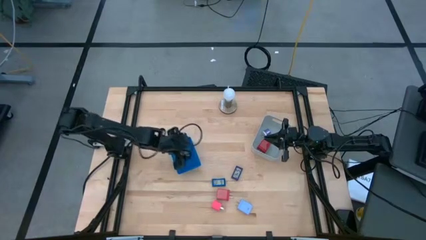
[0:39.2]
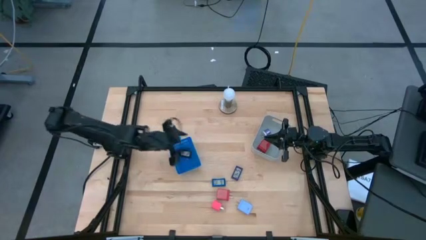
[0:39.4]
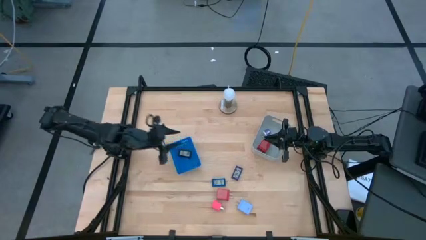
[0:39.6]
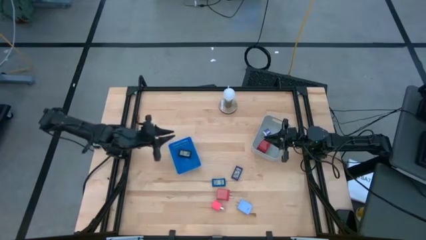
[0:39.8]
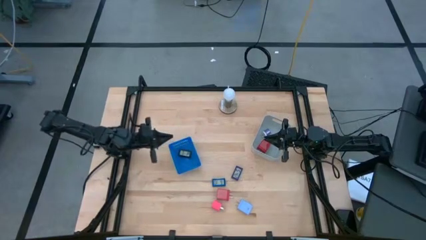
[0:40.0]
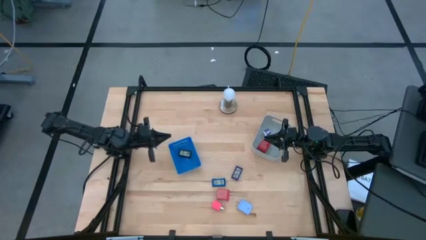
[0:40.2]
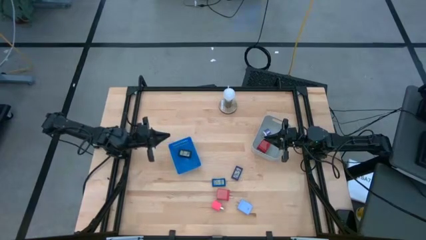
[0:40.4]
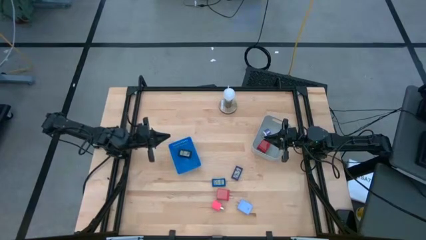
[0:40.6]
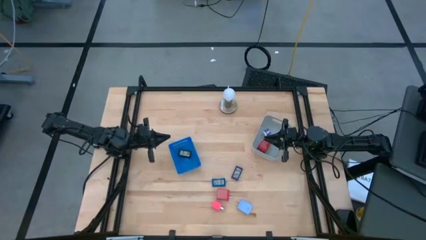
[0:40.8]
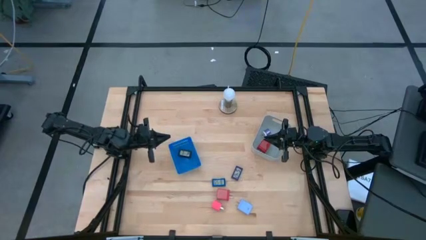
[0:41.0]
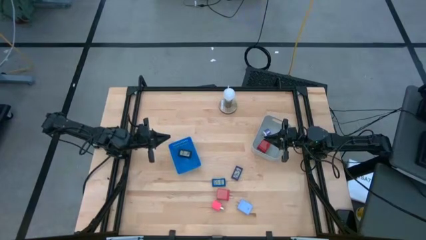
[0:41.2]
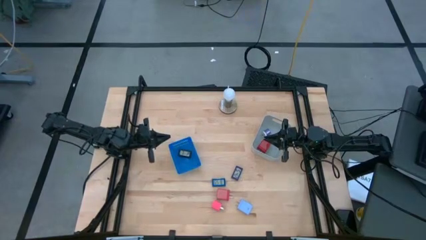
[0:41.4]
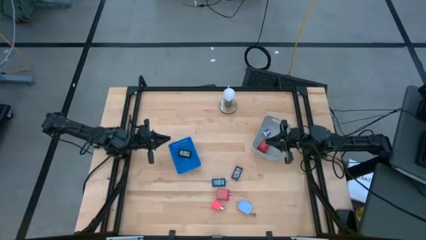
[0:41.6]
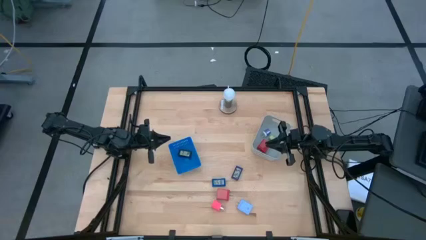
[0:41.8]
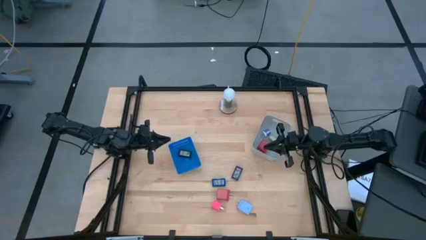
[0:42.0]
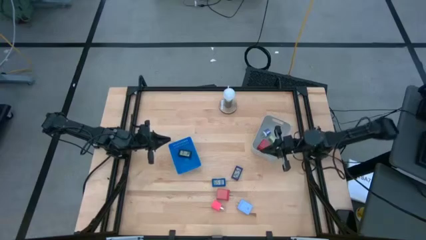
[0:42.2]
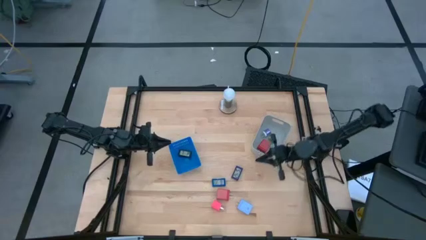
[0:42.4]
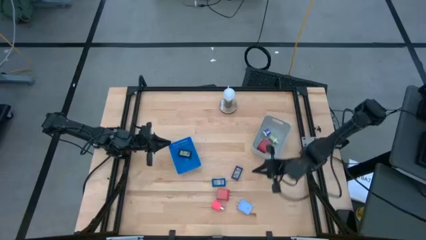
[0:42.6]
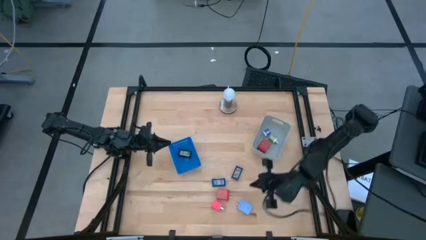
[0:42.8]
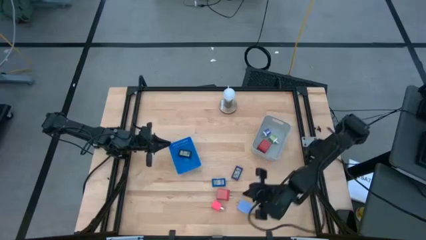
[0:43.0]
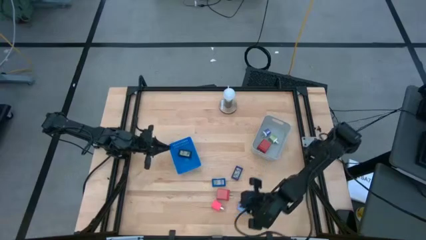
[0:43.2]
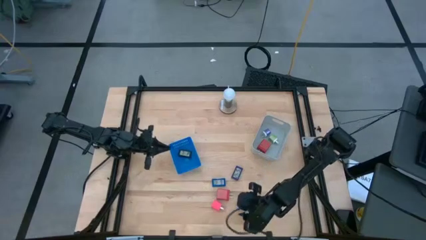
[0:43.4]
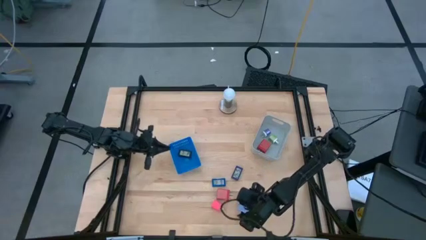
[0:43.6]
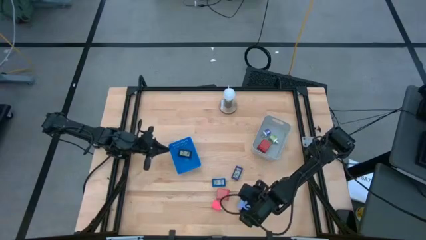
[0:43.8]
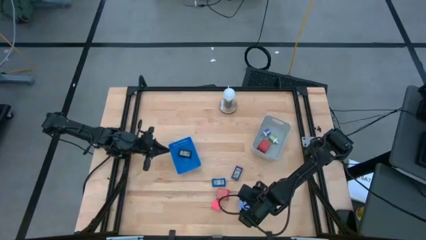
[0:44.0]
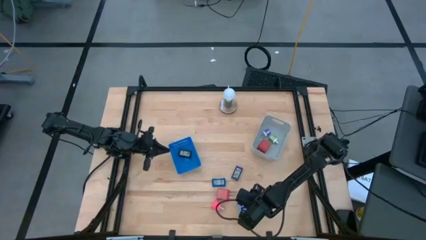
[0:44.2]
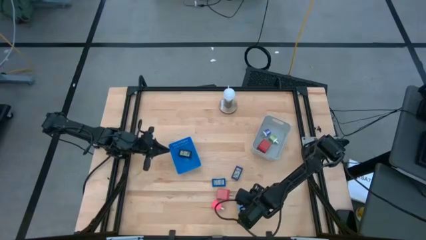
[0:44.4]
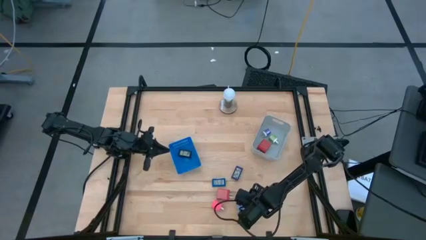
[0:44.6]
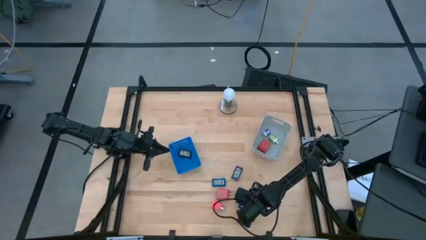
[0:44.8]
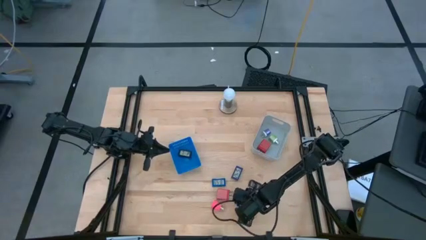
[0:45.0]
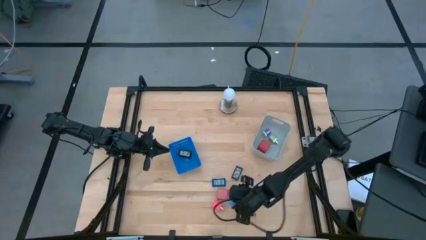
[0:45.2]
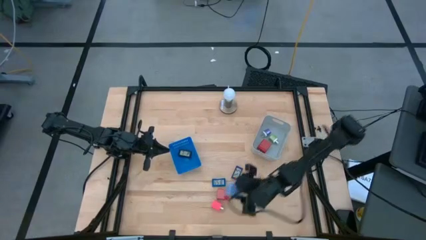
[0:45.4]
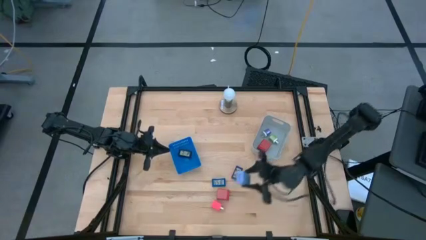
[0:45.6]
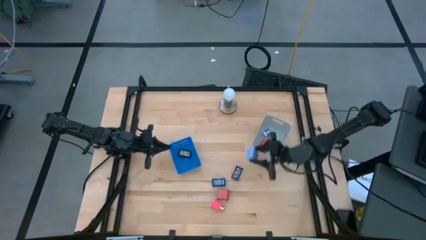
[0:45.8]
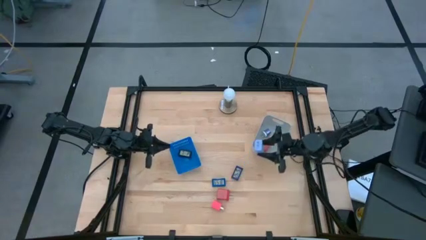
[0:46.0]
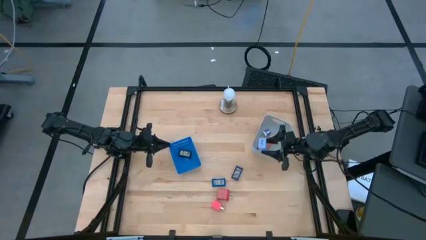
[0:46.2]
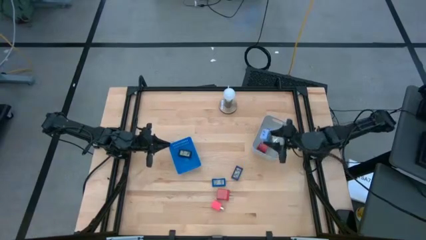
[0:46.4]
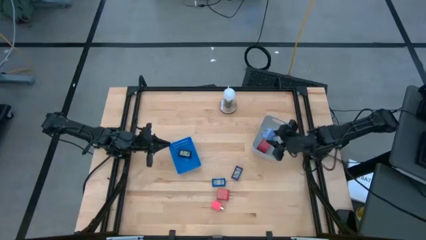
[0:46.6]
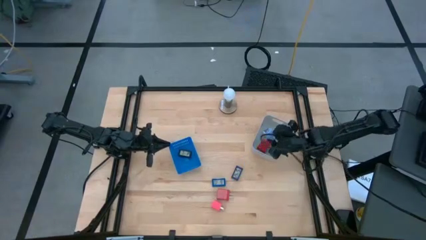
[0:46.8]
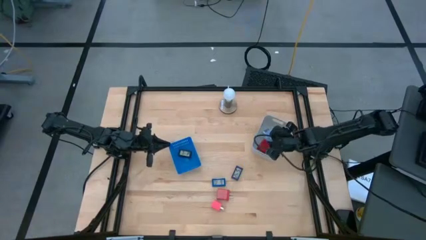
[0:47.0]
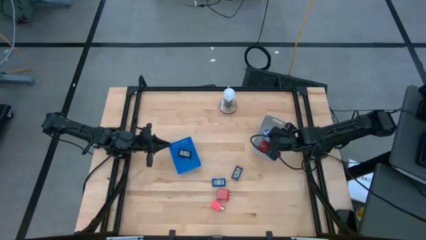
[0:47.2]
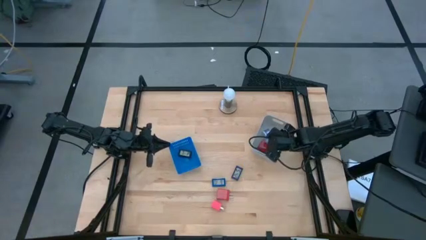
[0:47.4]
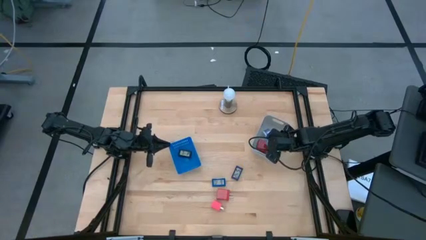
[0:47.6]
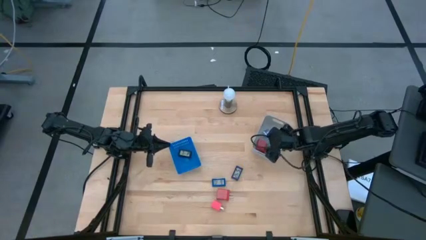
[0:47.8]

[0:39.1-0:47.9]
Task: Pick & Place Office items
Put the light blue changer adapter into the gray bin

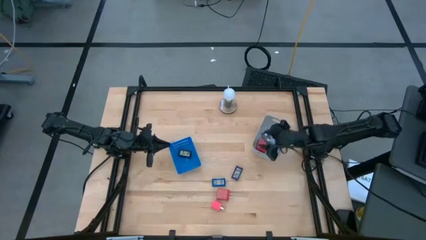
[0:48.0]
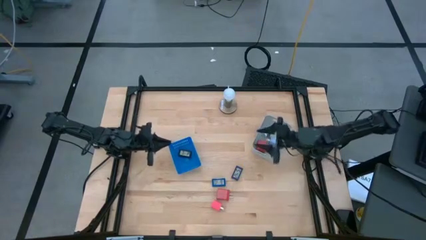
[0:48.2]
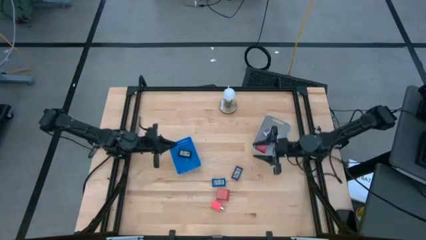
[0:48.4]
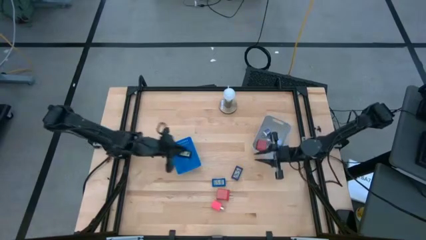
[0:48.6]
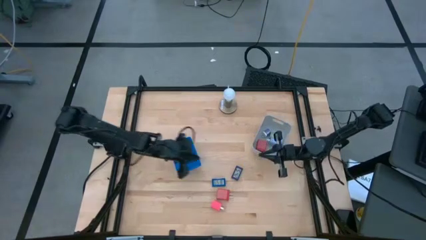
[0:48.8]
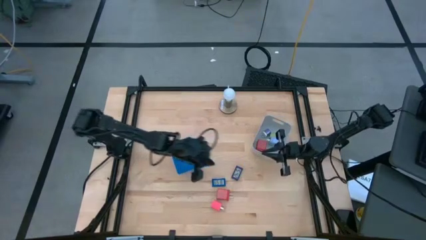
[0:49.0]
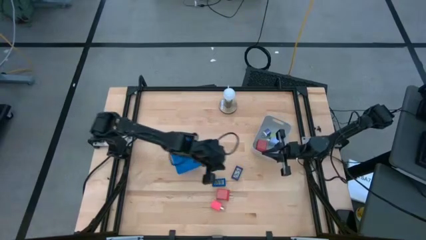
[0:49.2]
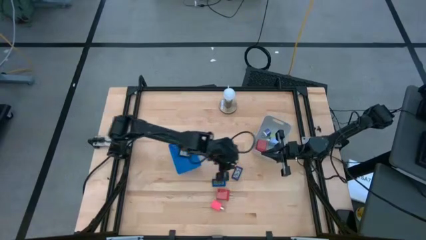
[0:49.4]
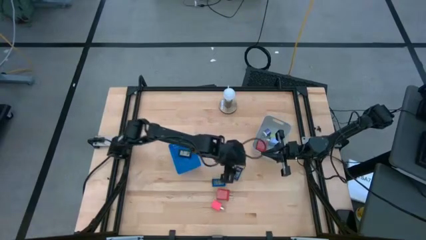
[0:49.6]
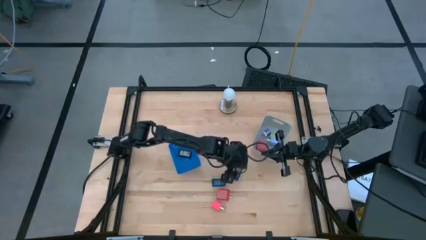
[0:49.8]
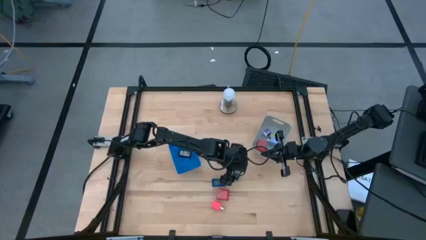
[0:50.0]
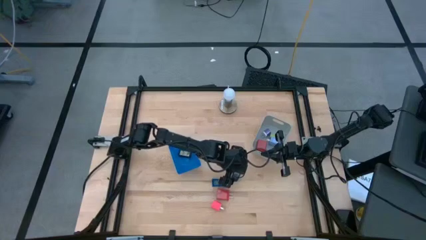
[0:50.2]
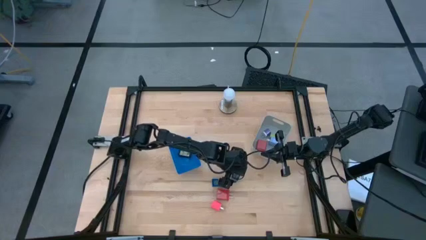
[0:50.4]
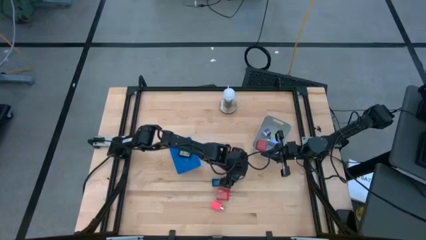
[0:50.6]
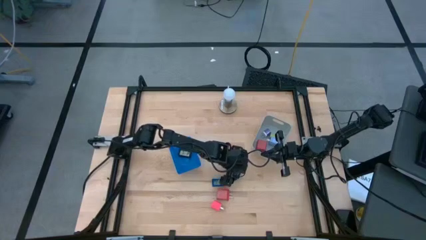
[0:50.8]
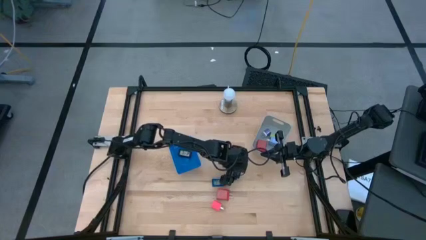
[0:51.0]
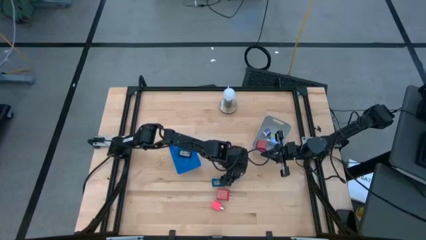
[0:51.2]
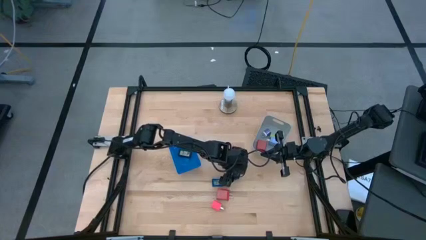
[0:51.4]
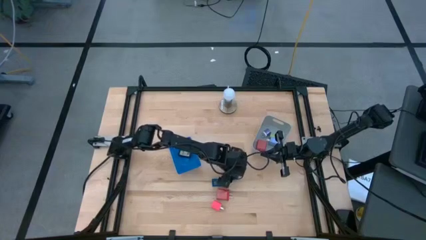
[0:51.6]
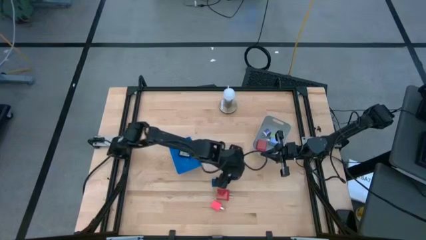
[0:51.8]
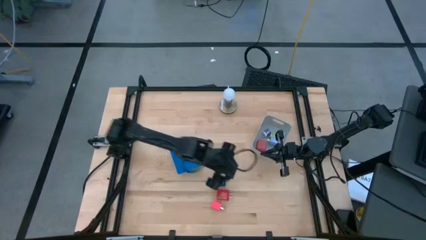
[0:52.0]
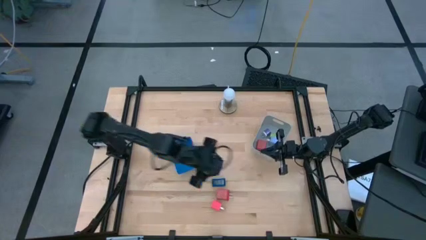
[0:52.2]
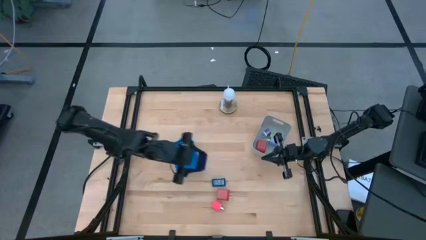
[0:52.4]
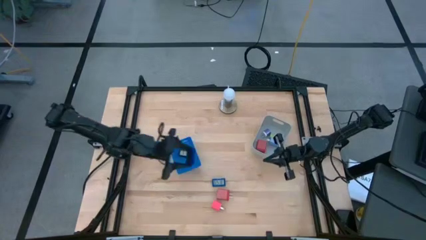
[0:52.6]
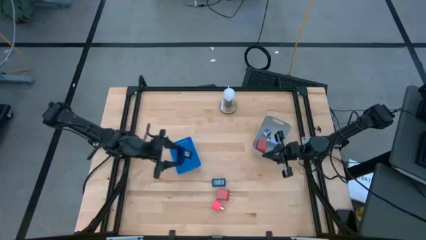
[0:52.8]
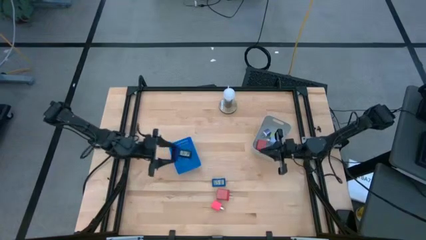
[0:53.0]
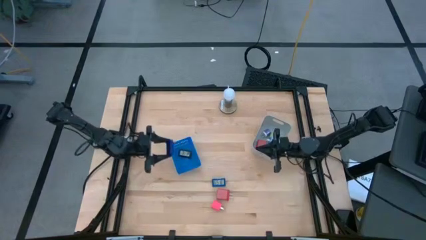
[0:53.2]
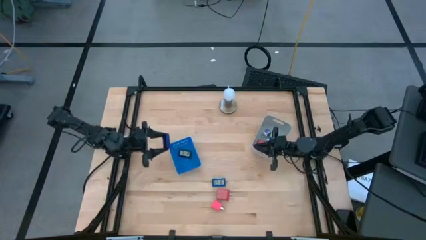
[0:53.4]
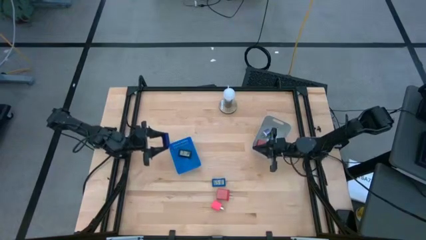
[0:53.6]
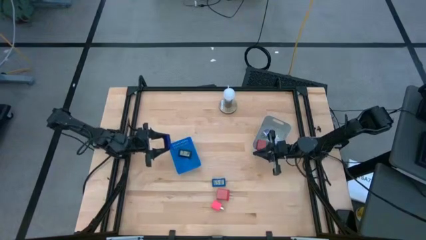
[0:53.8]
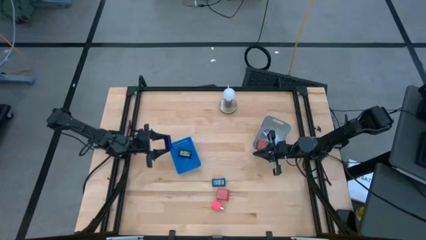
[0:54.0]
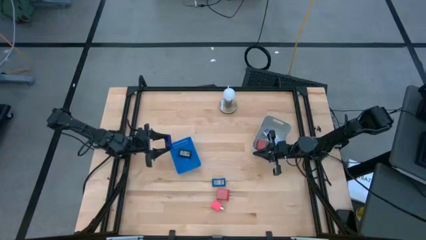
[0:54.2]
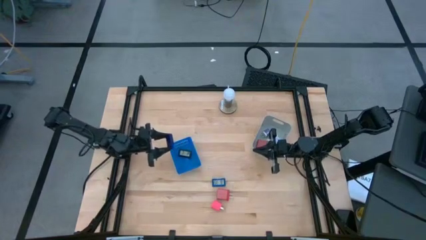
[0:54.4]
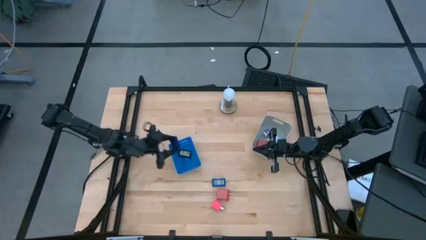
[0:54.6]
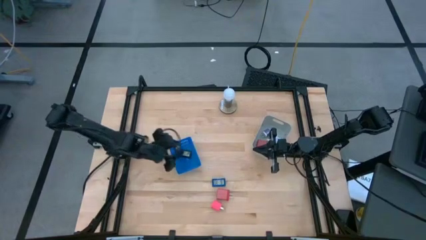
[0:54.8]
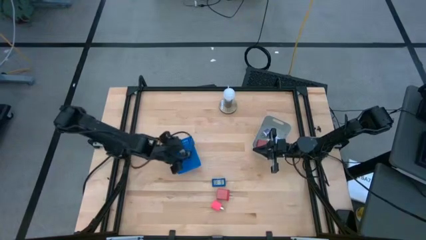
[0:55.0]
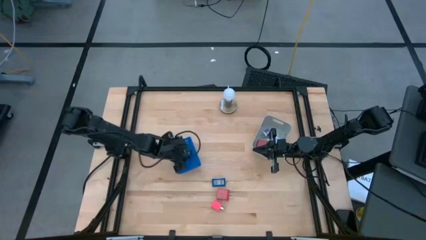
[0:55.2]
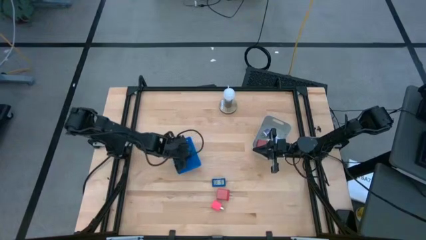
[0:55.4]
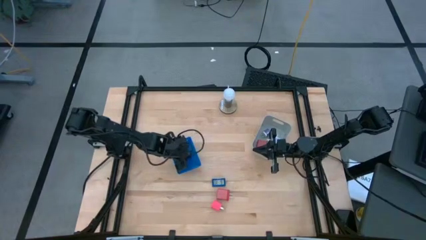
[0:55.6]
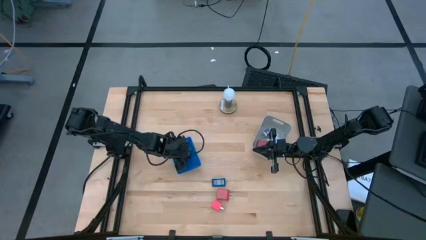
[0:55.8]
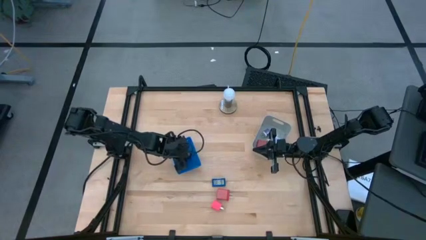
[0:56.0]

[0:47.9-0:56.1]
Put the dark blue digital timer into the blue bin
